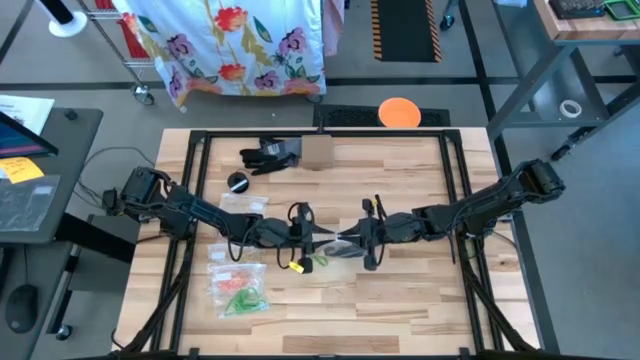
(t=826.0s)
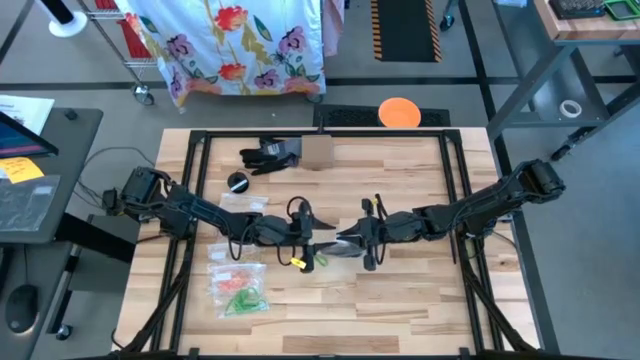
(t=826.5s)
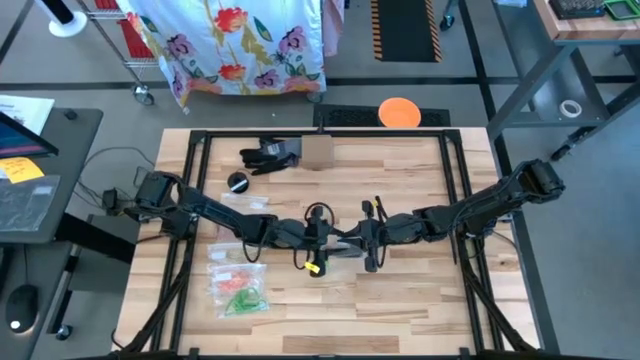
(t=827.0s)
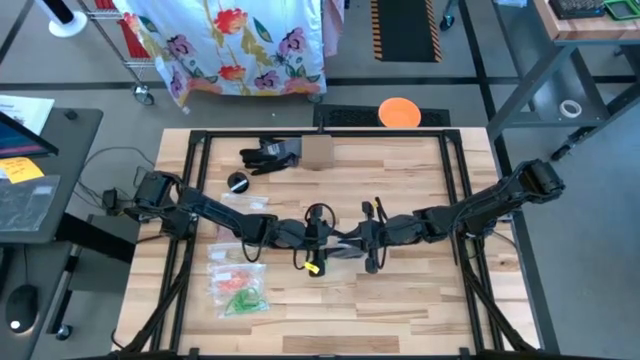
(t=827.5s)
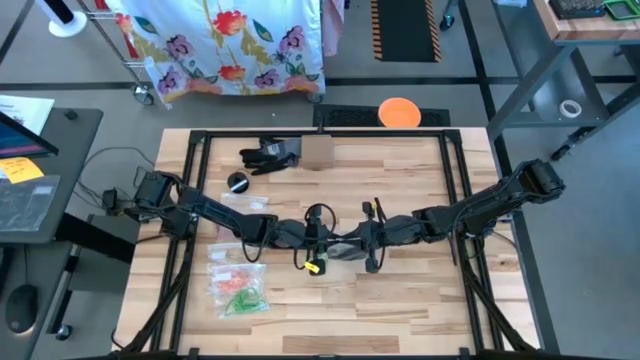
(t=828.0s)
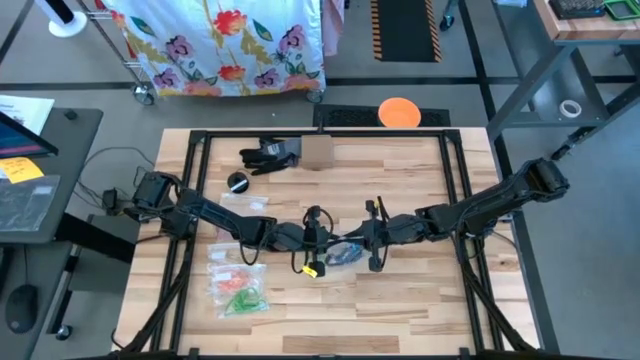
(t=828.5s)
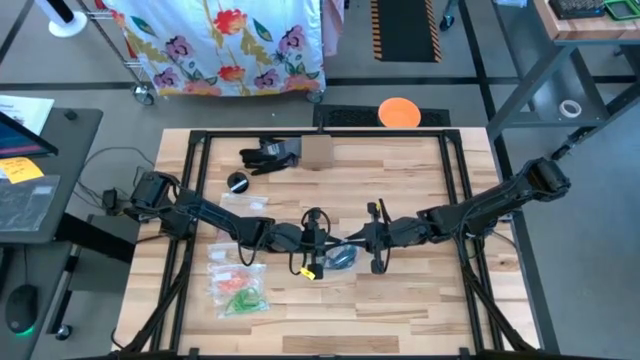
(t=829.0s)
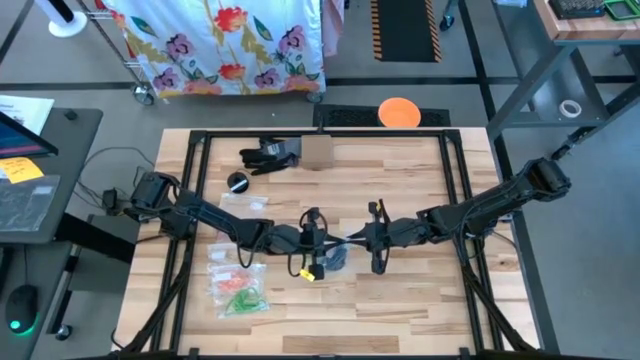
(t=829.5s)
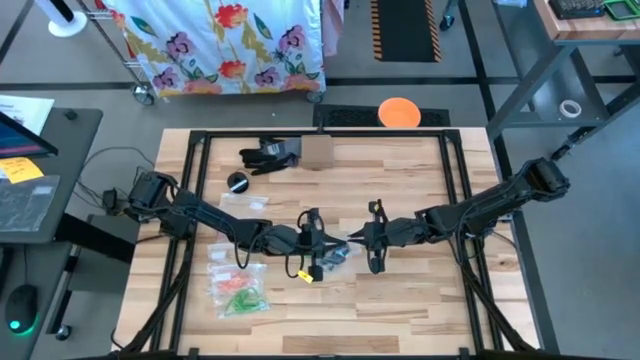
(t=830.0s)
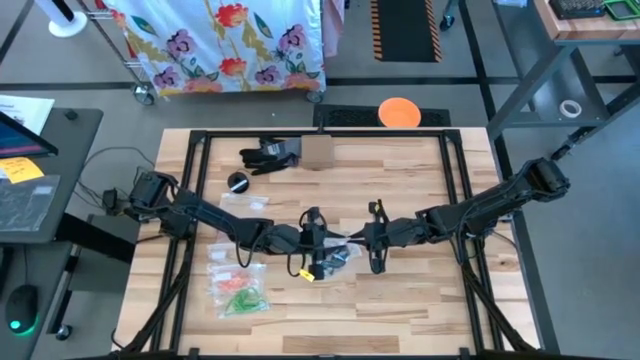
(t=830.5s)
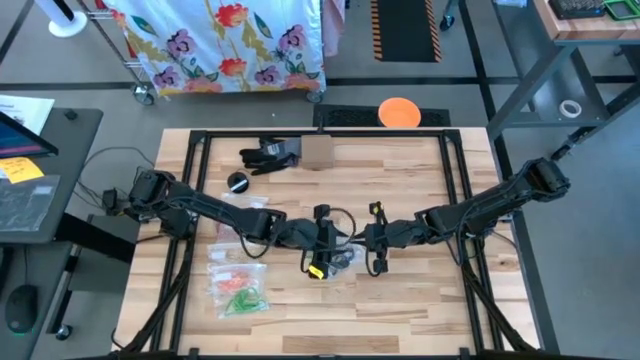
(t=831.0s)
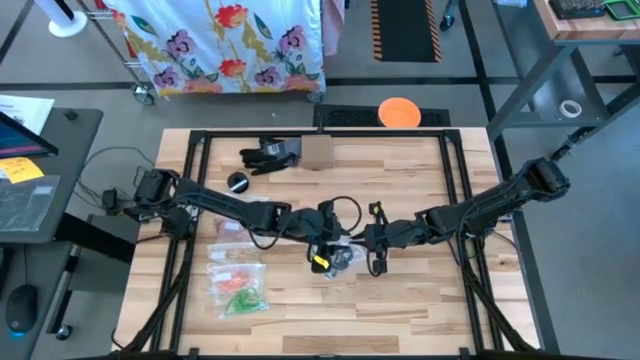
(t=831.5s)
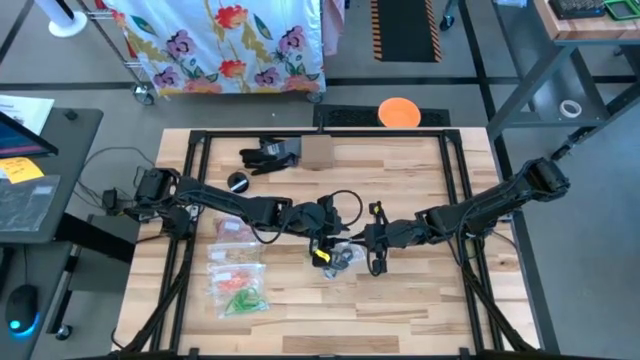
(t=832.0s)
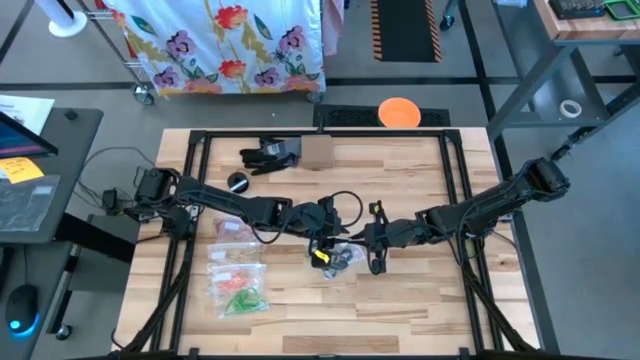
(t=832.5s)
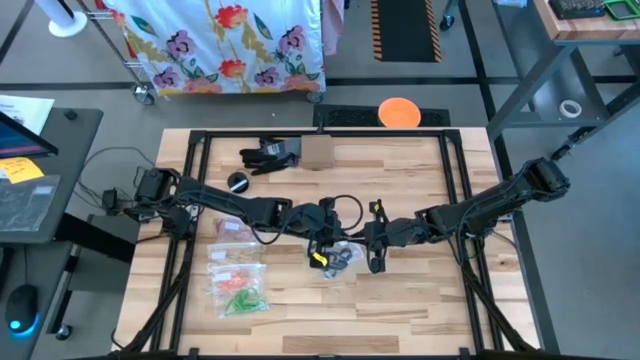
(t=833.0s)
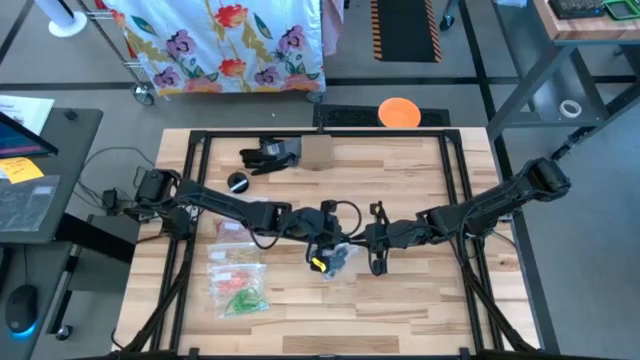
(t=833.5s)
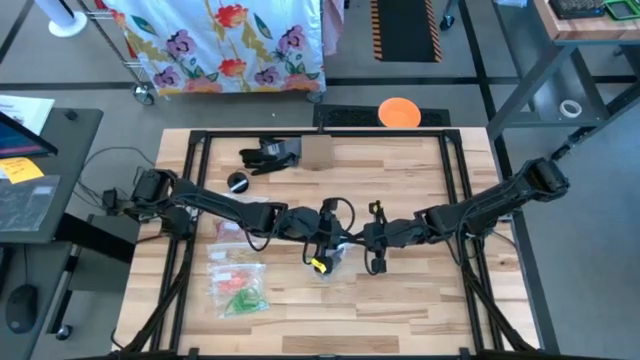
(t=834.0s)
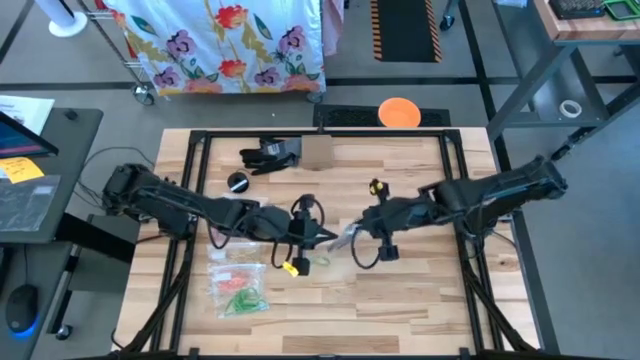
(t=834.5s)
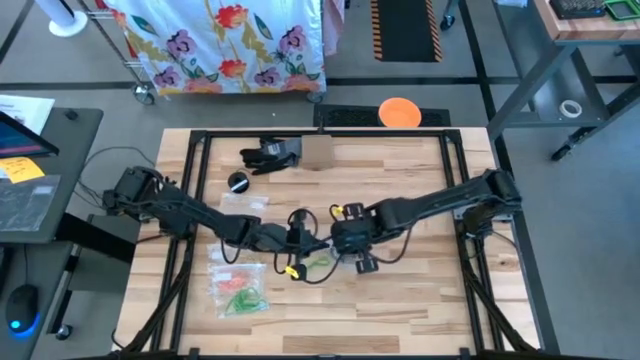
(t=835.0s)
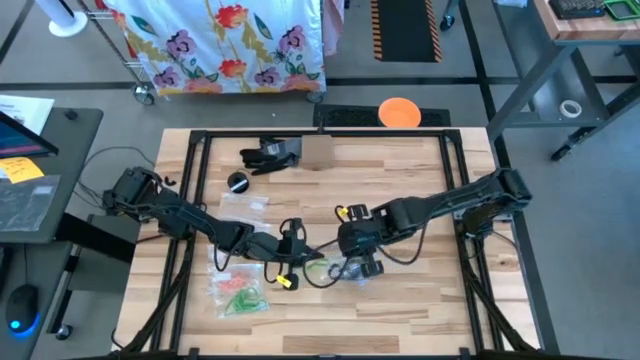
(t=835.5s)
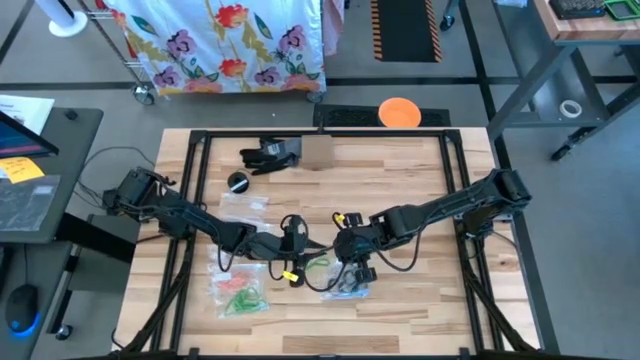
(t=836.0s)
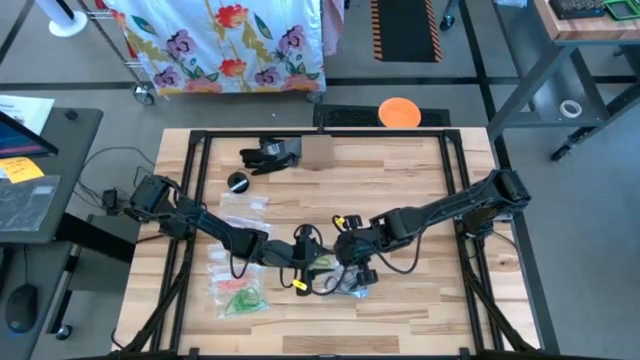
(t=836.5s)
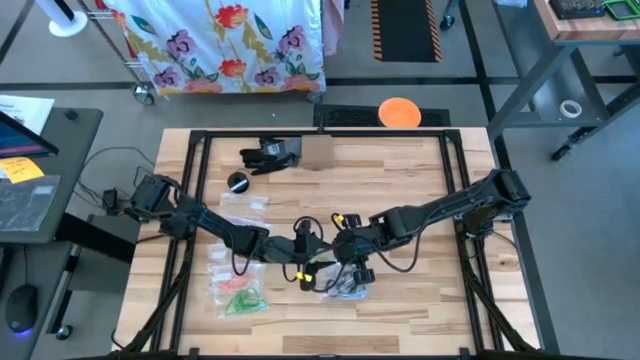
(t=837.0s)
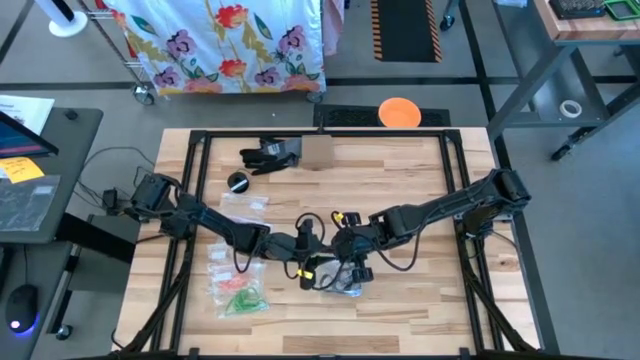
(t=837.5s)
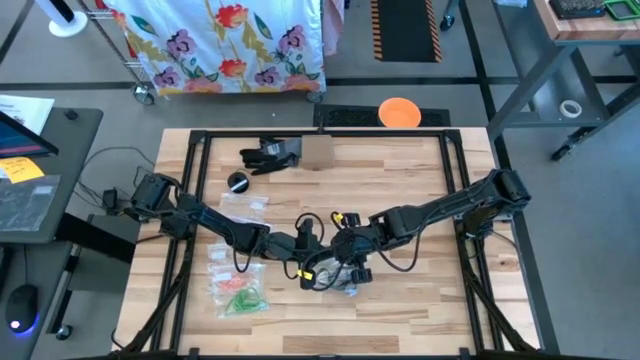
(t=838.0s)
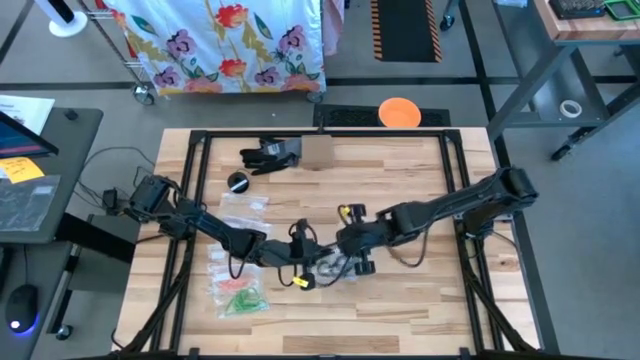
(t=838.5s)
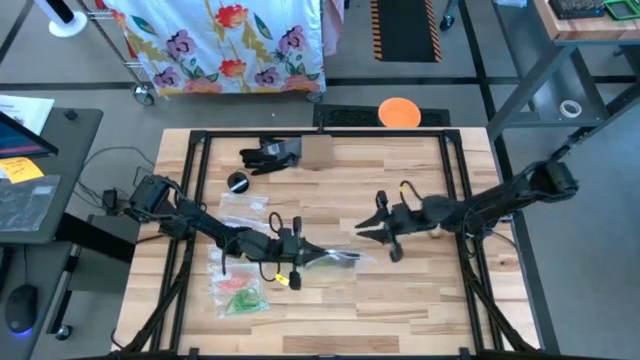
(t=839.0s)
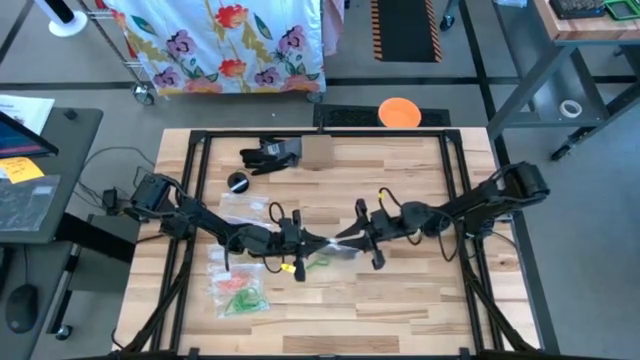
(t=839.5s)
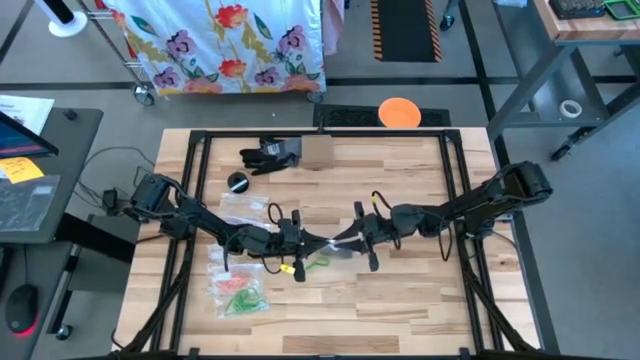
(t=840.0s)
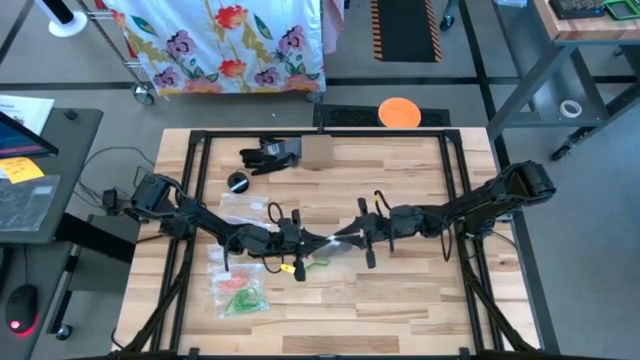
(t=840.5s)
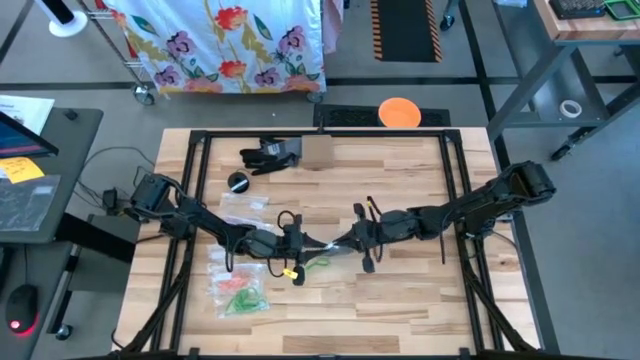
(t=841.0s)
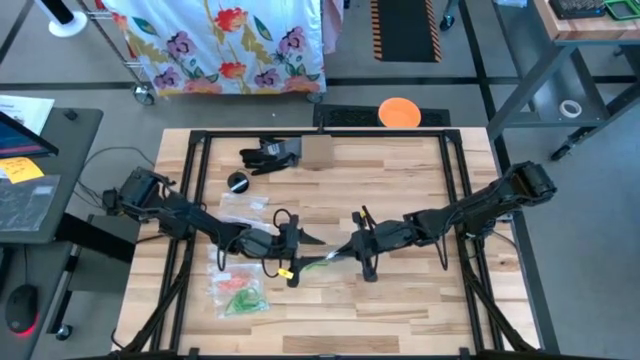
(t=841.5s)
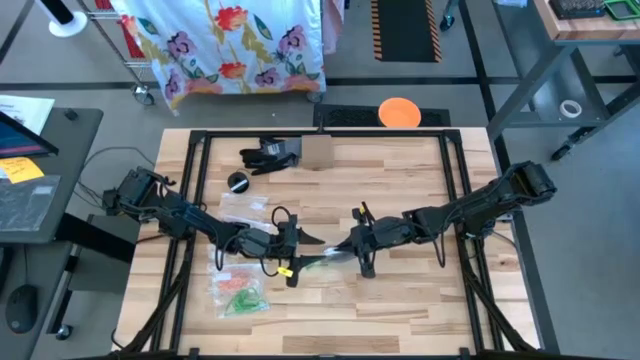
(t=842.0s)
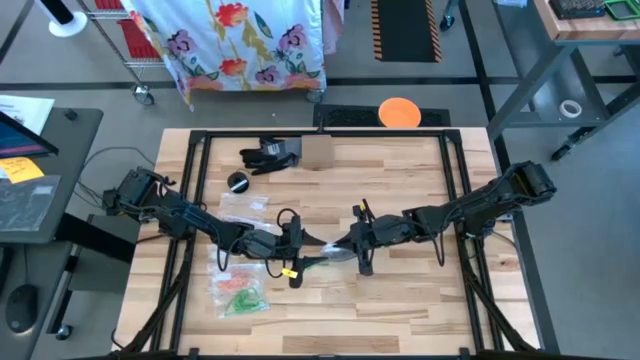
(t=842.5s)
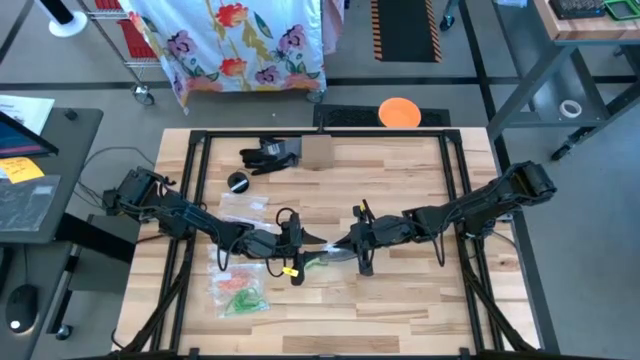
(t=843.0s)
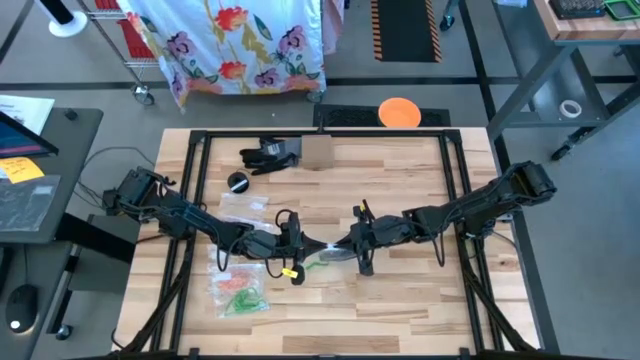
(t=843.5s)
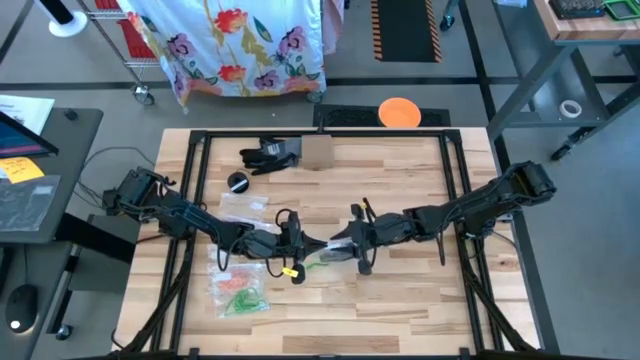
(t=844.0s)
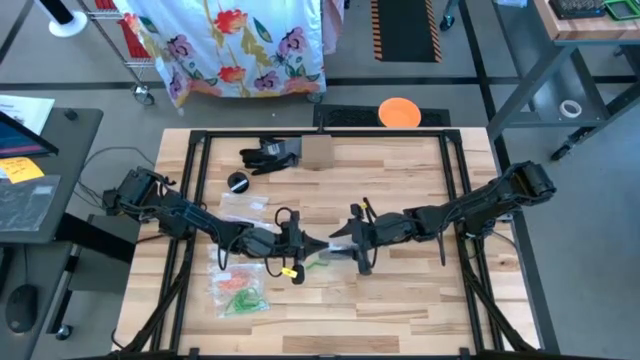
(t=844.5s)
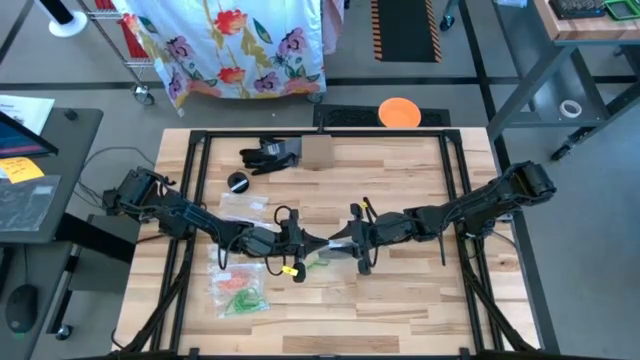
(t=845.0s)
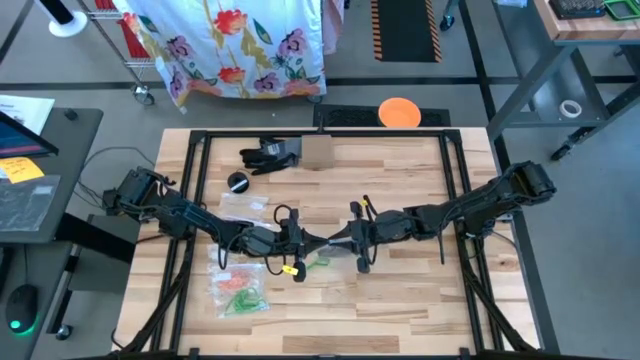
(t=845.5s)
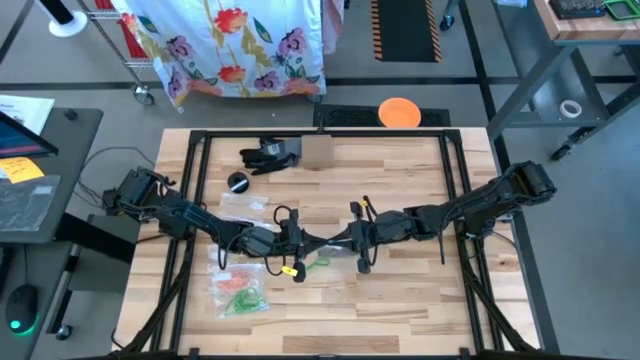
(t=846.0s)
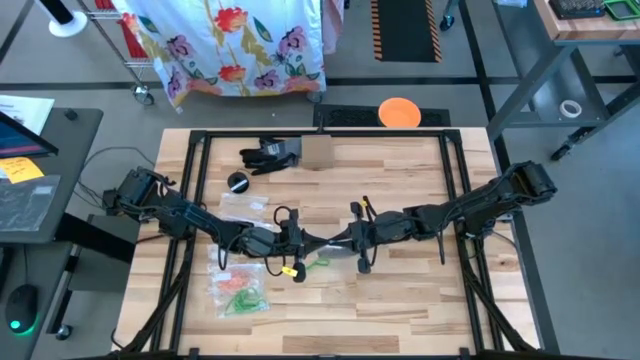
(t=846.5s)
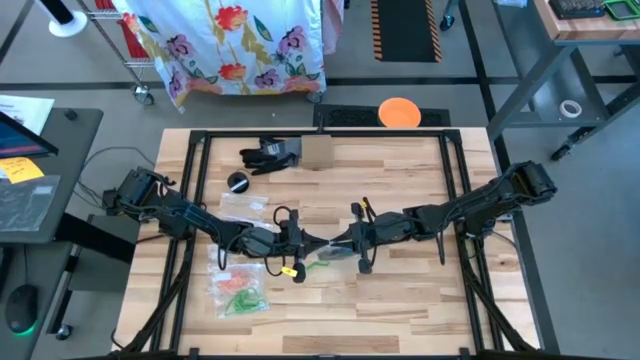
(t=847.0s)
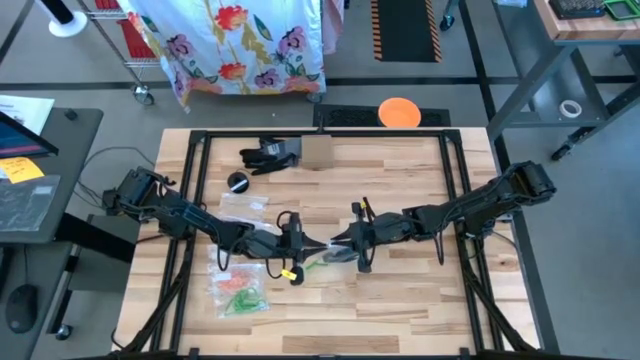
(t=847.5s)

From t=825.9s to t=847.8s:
Task: Sort rubber bands
Close the transparent zip bag
